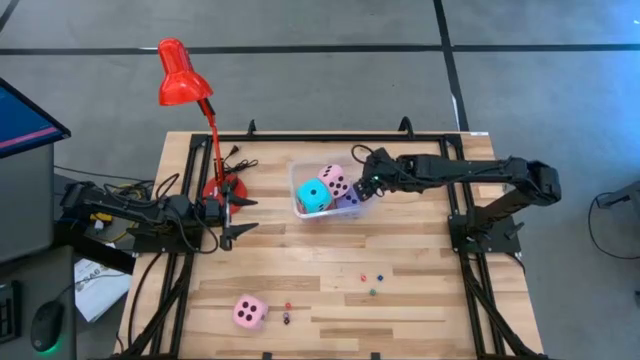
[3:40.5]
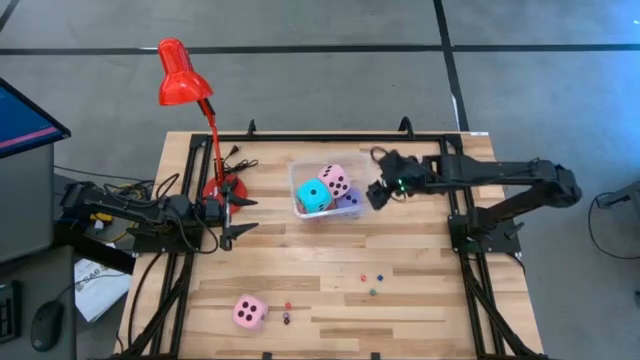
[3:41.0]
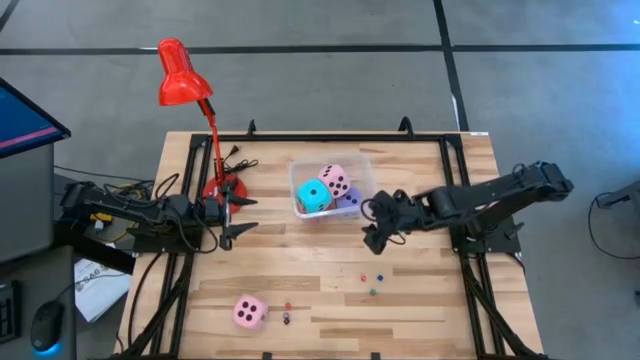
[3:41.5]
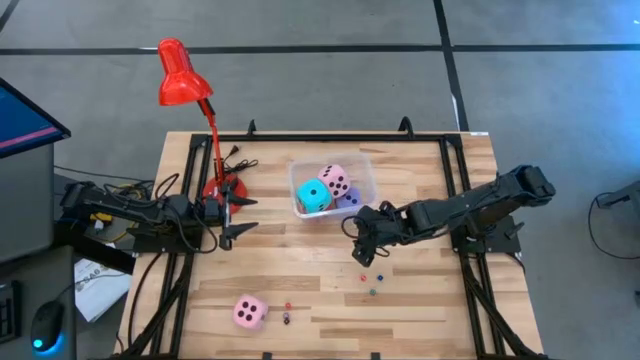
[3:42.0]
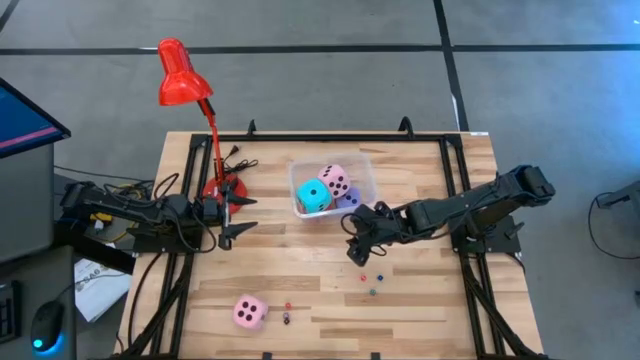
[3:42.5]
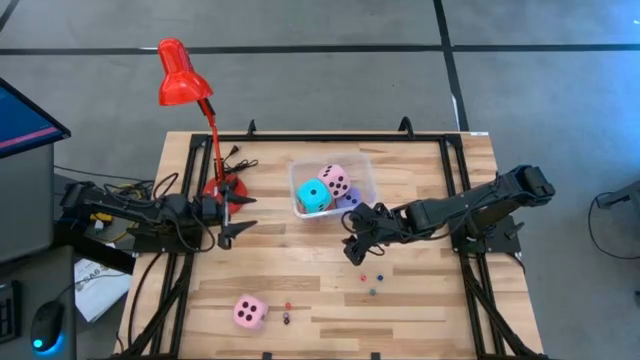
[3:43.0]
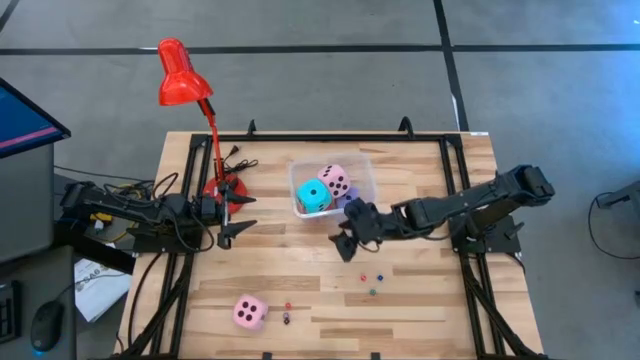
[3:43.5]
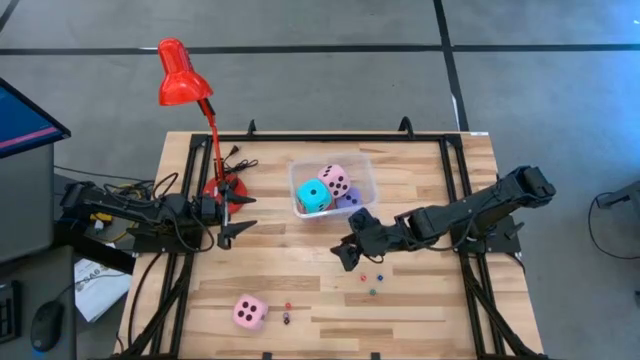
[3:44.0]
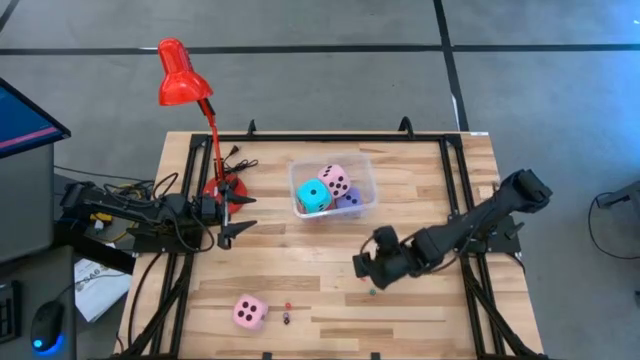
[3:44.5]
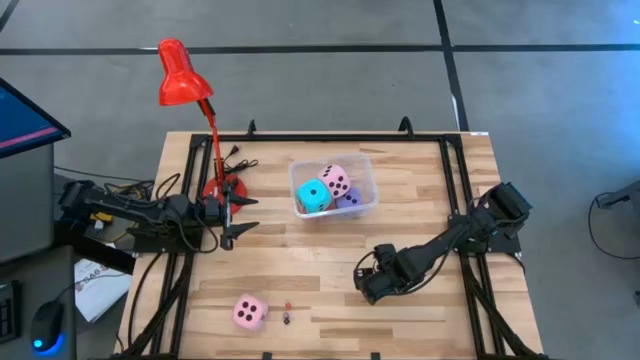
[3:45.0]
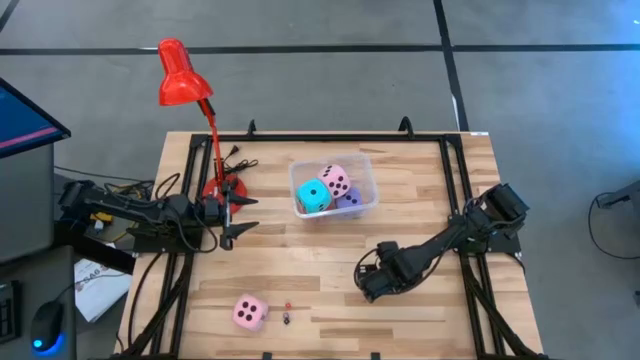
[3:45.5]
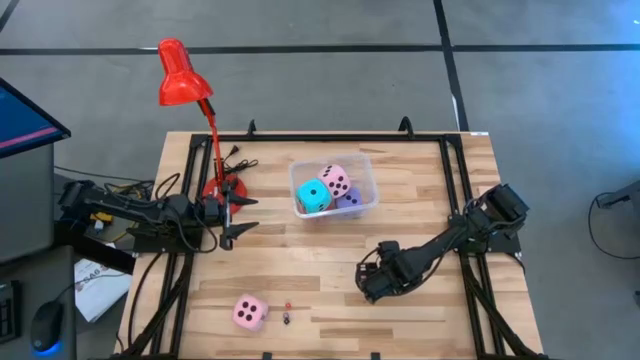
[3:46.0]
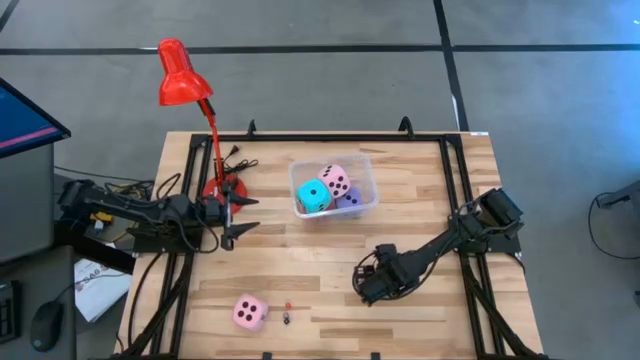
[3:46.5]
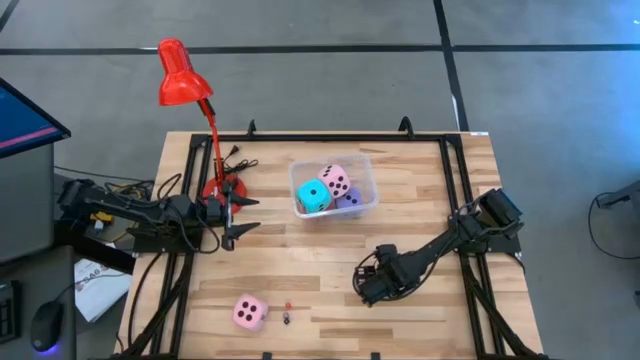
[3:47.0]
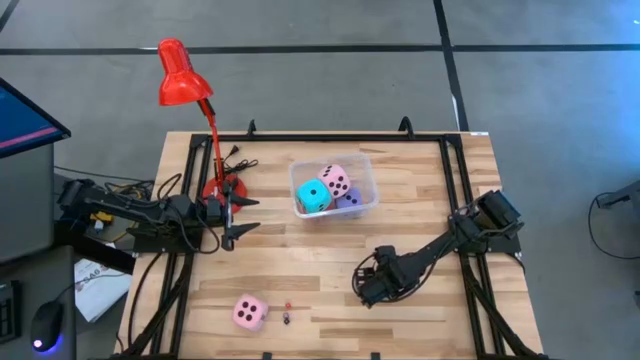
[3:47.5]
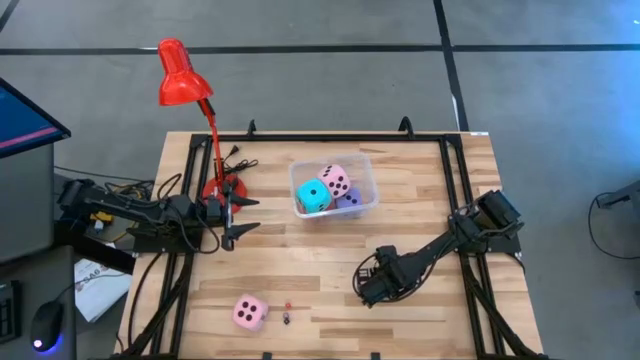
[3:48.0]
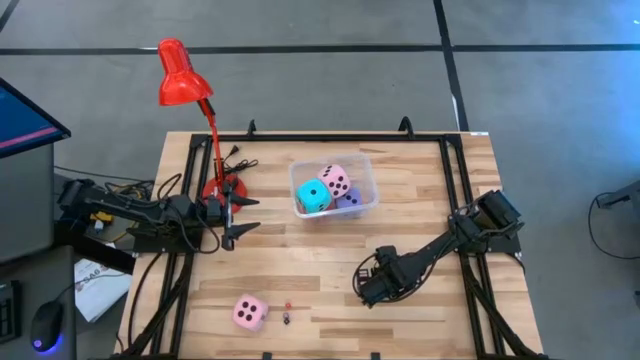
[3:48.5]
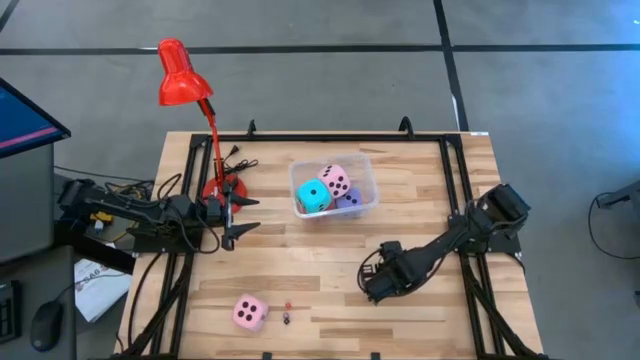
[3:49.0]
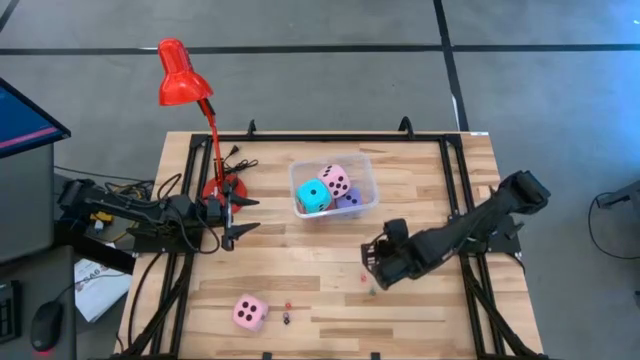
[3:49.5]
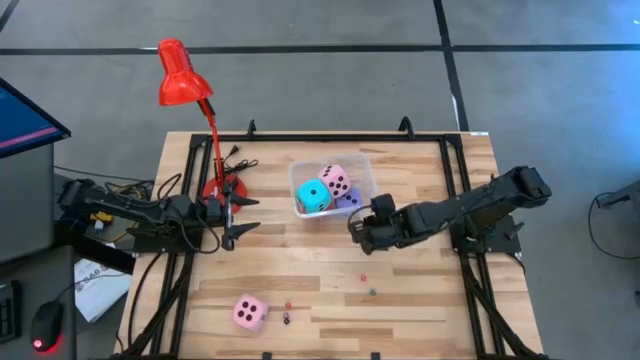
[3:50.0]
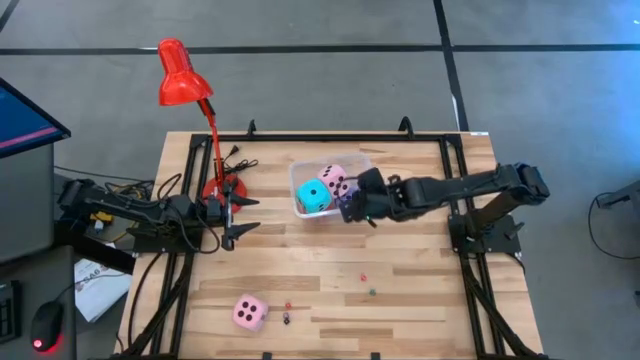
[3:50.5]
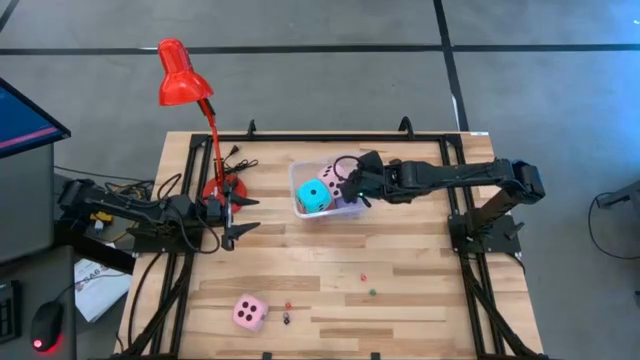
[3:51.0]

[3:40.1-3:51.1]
Task: Pick & Place Dice
Put the small blue die into the transparent bin

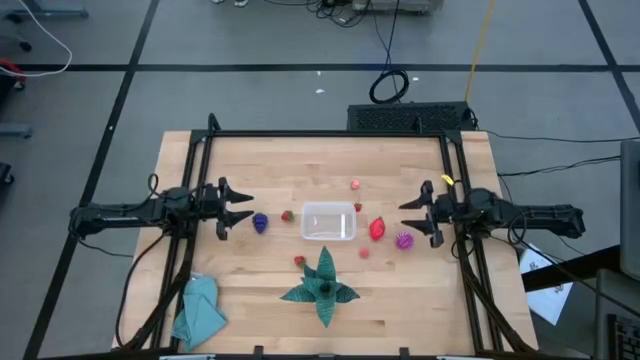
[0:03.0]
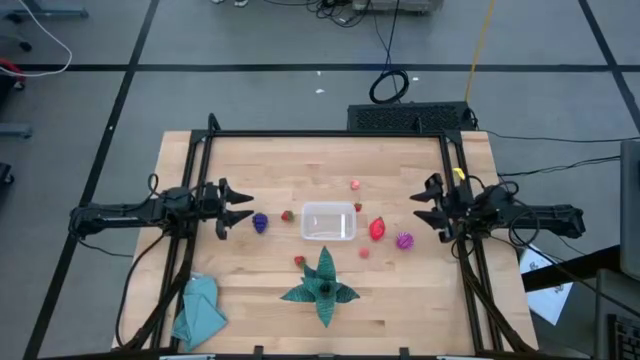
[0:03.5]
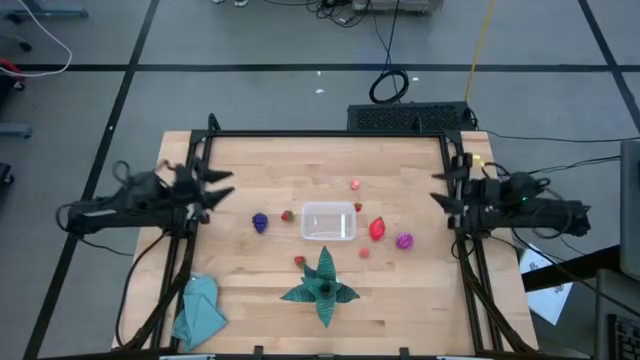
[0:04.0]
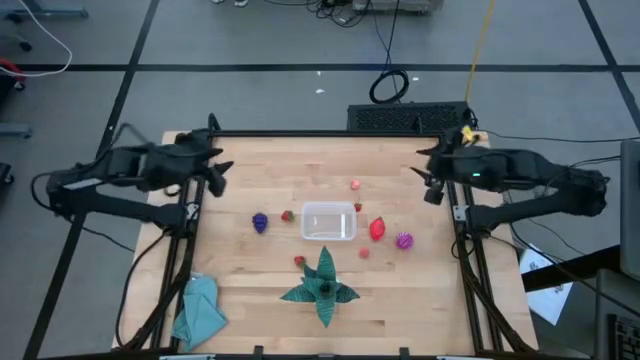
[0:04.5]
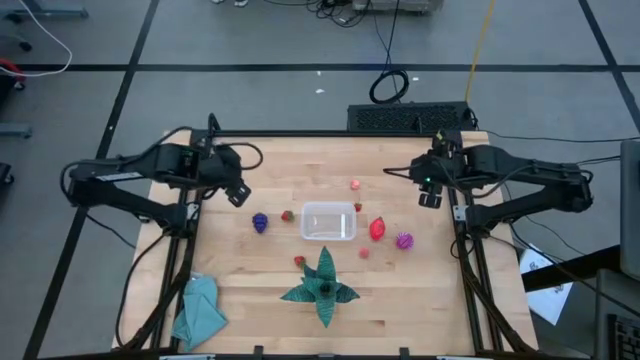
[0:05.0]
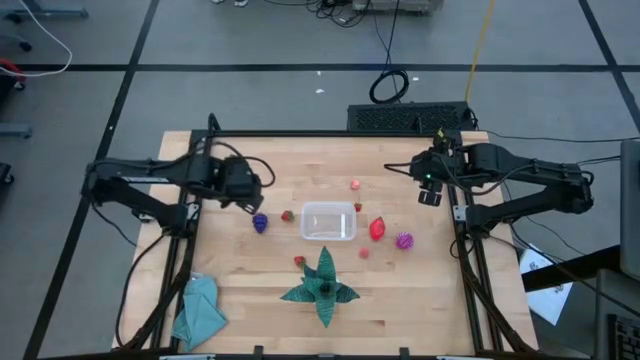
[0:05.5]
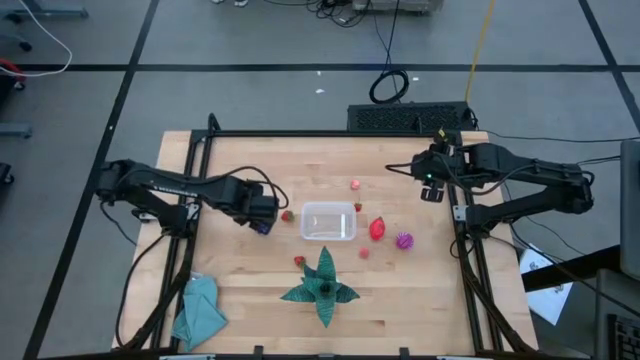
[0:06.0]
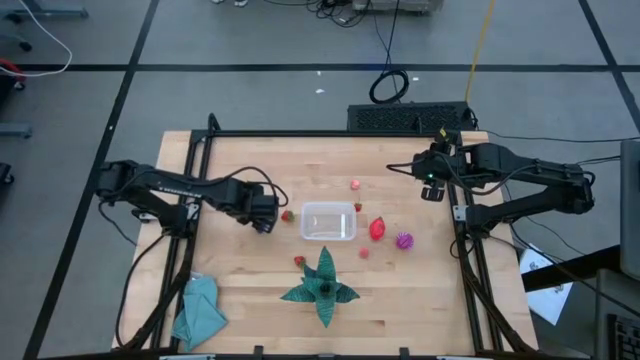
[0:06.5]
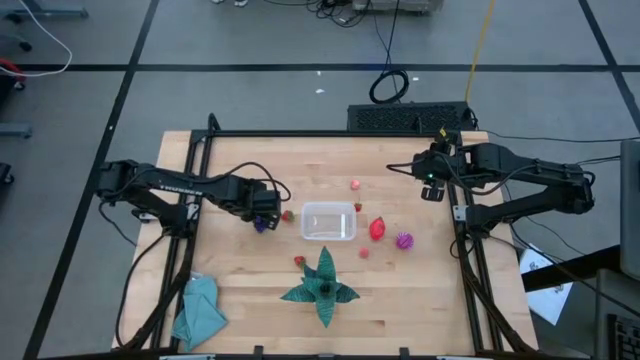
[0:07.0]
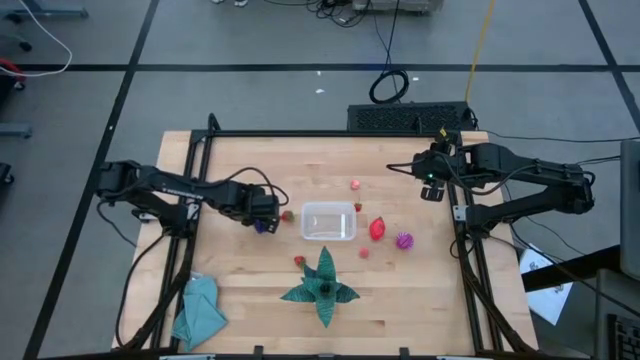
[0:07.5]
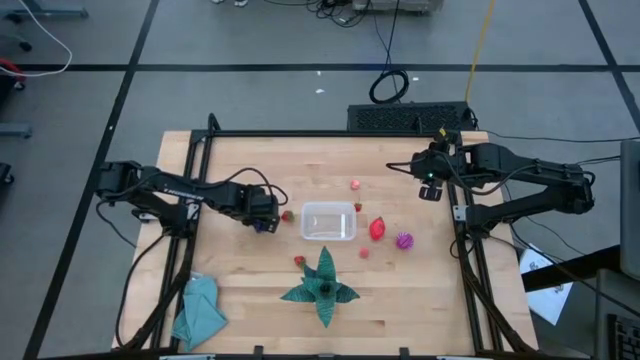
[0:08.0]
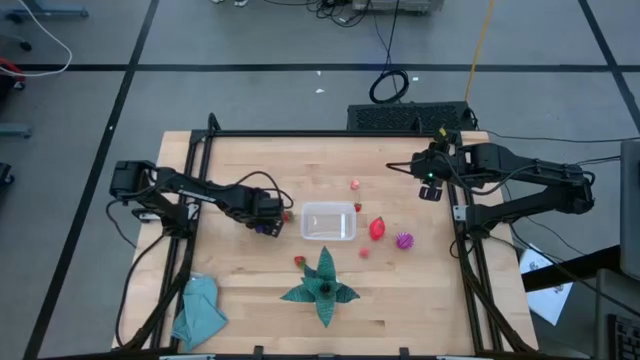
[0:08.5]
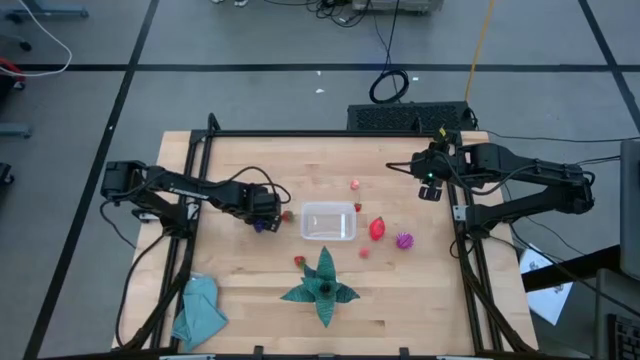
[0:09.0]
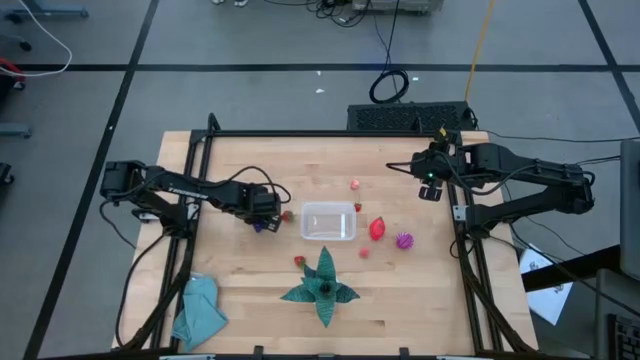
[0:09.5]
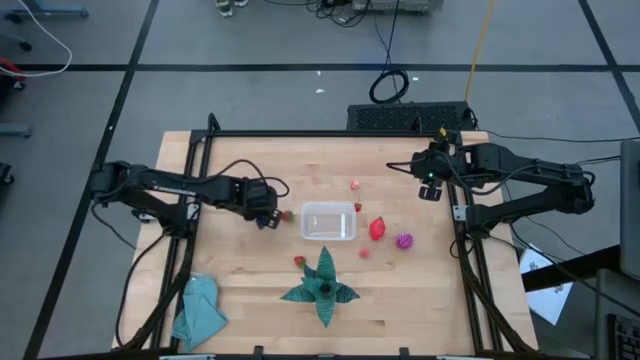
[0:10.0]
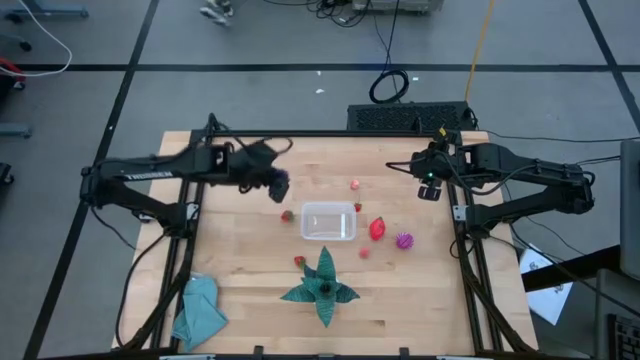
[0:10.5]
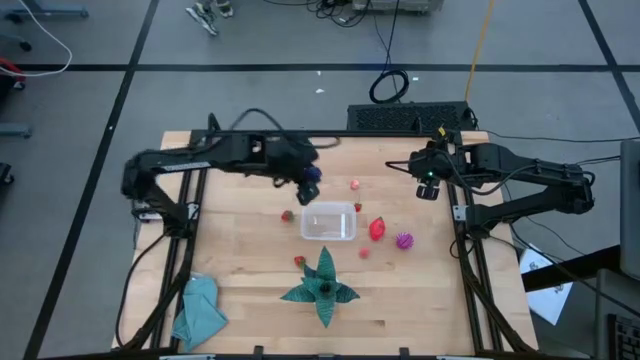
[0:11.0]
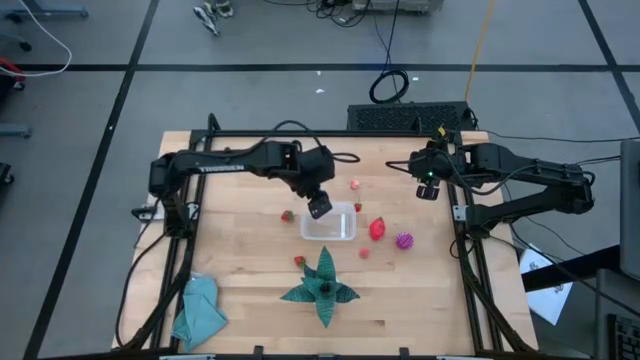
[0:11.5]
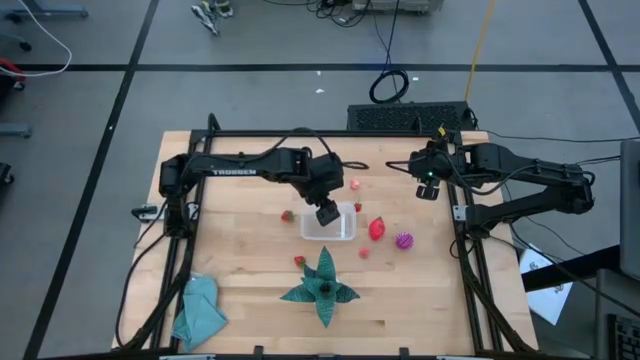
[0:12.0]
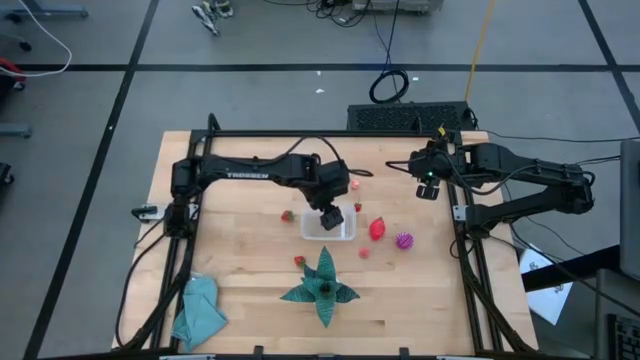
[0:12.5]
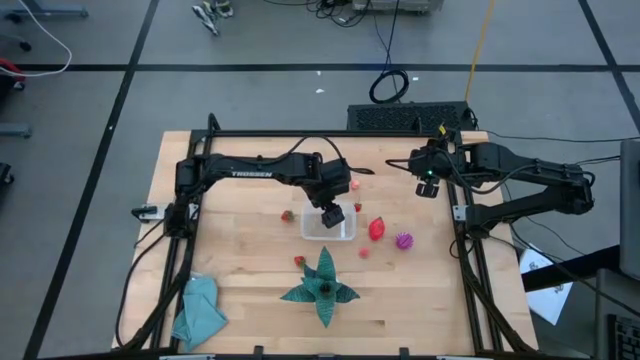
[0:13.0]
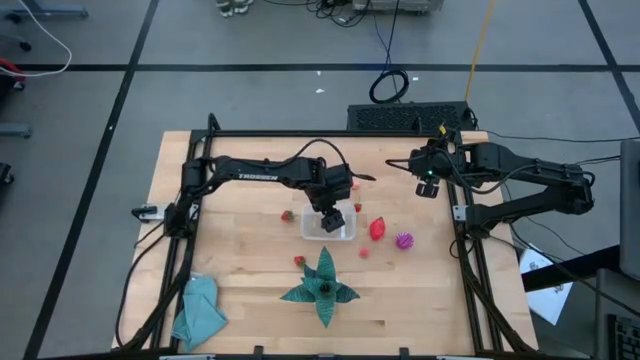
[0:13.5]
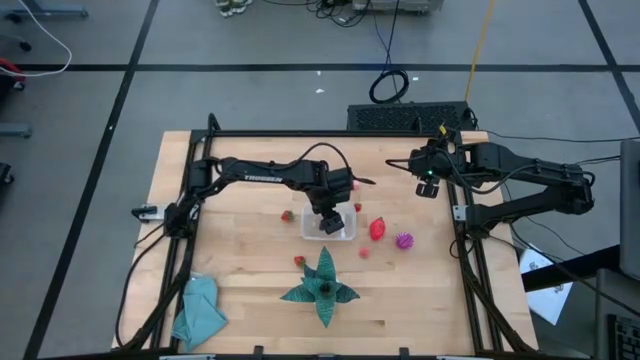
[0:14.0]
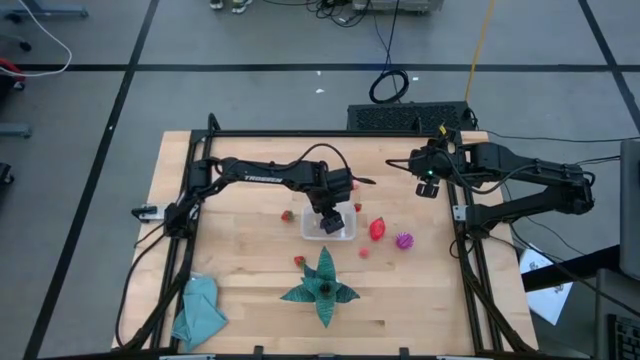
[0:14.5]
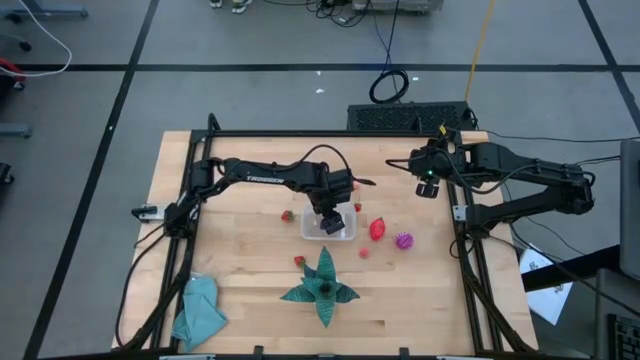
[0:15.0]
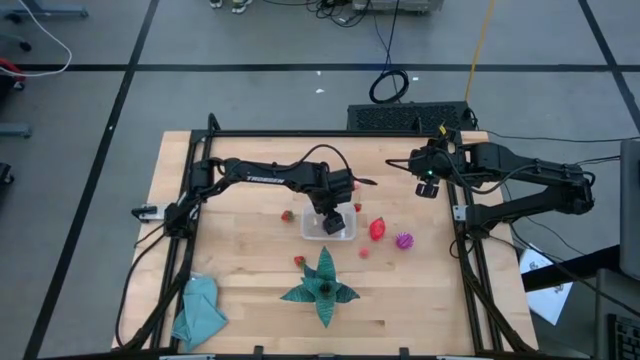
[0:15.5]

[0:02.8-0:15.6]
Task: Pick and placing Produce into tupperware
Put the purple grapes into the transparent bin
